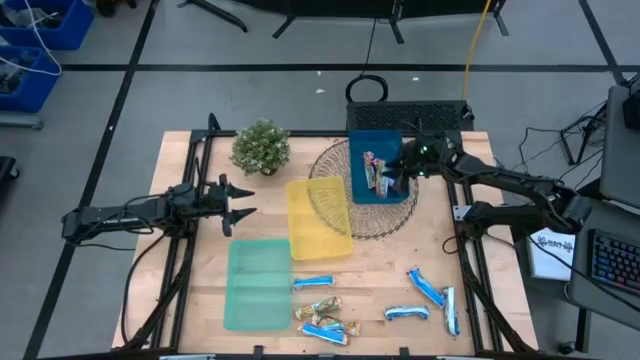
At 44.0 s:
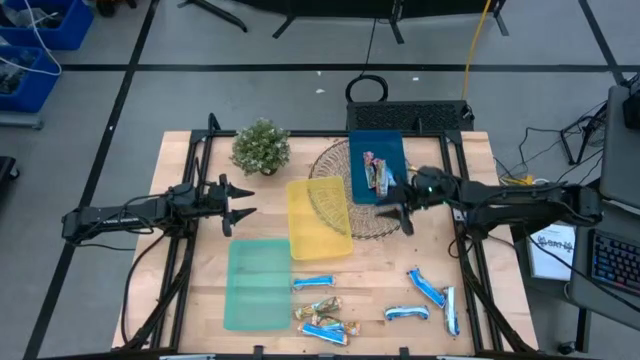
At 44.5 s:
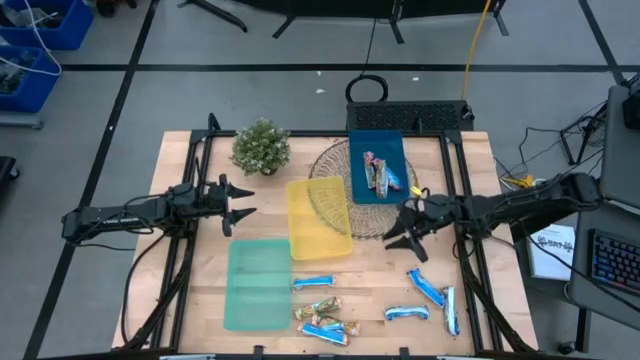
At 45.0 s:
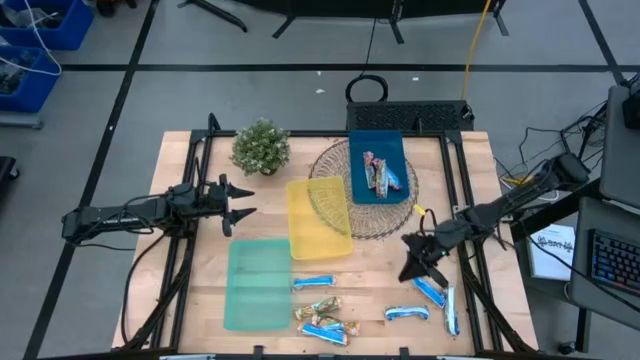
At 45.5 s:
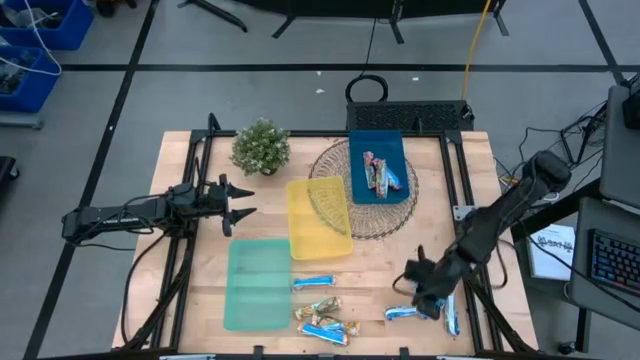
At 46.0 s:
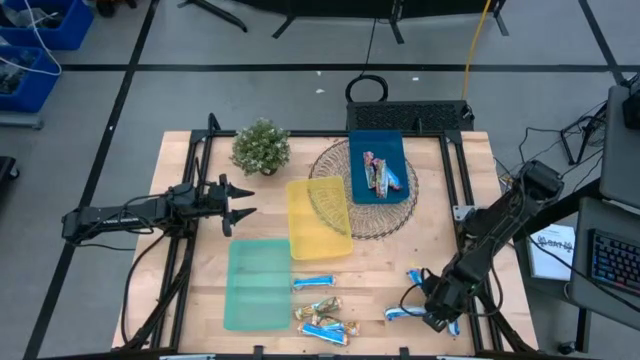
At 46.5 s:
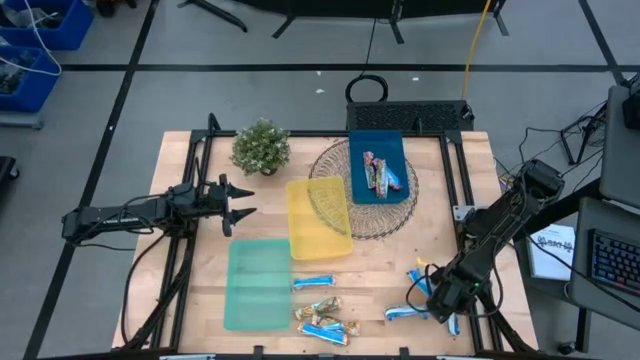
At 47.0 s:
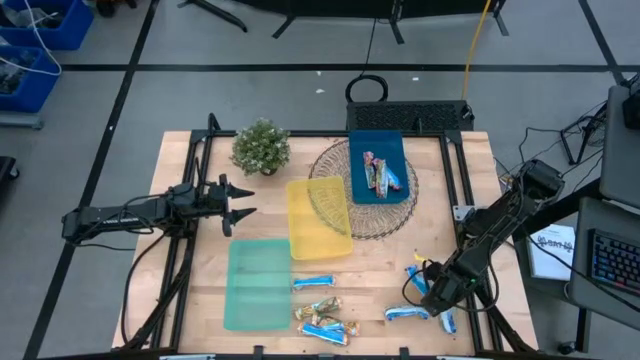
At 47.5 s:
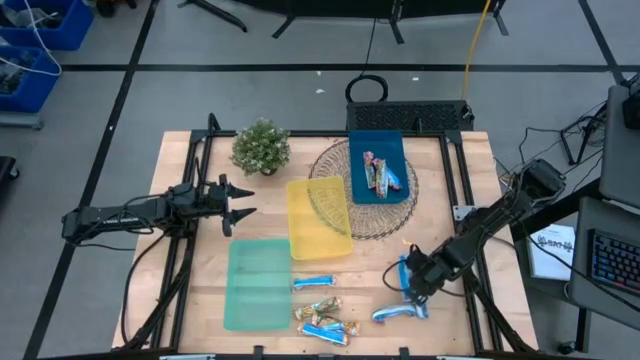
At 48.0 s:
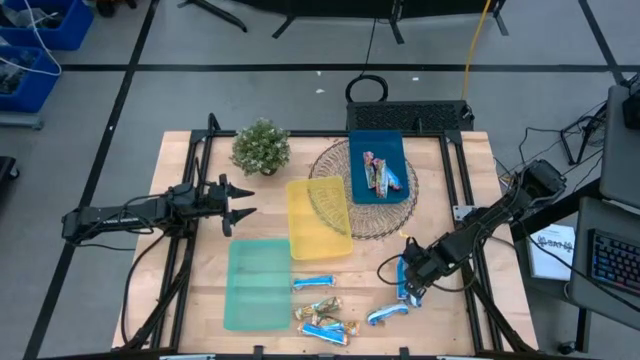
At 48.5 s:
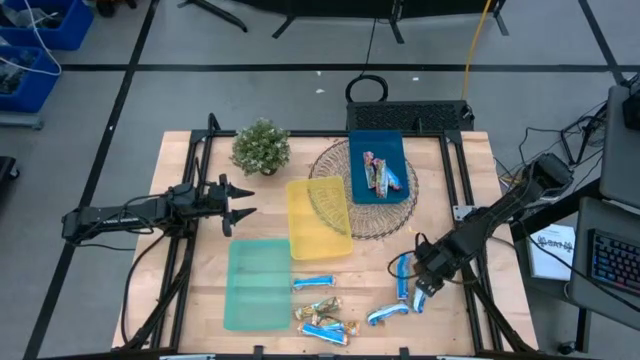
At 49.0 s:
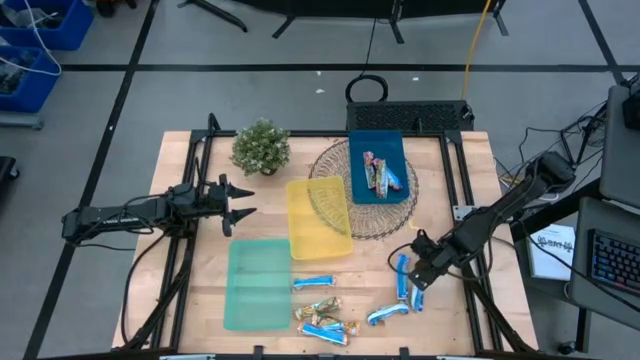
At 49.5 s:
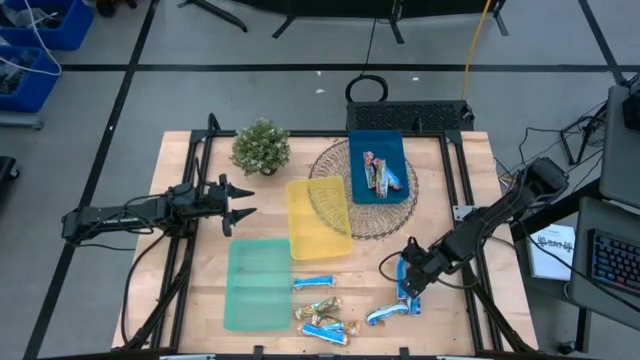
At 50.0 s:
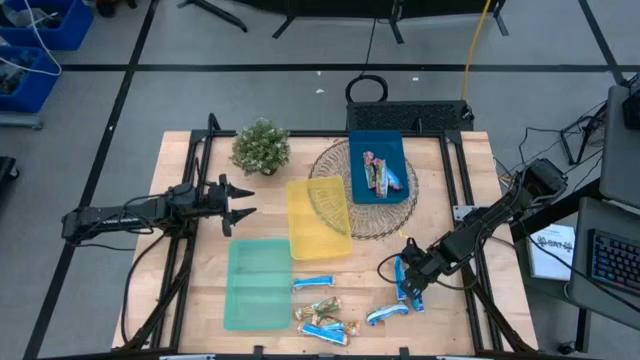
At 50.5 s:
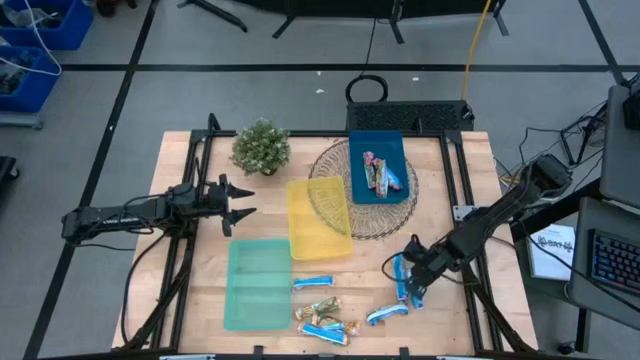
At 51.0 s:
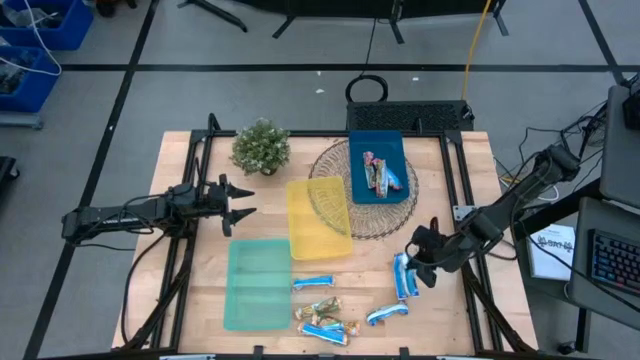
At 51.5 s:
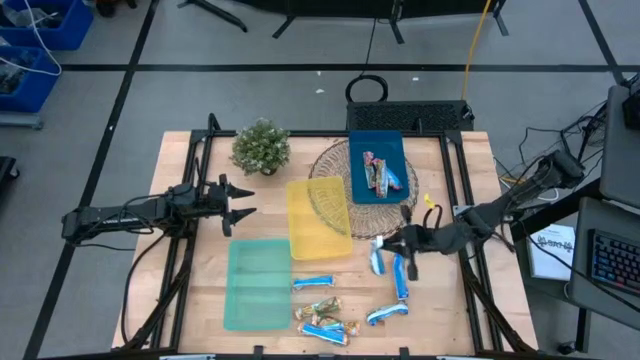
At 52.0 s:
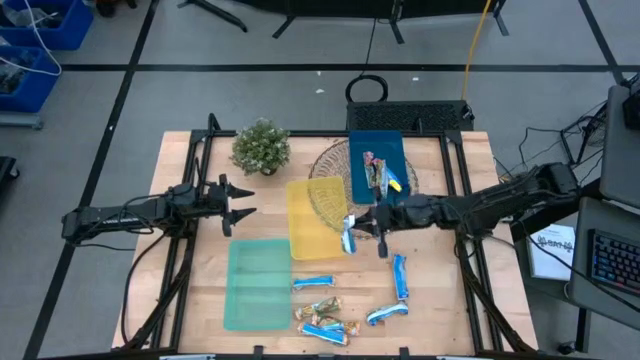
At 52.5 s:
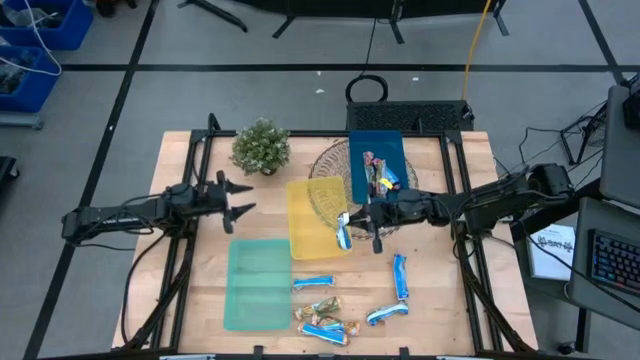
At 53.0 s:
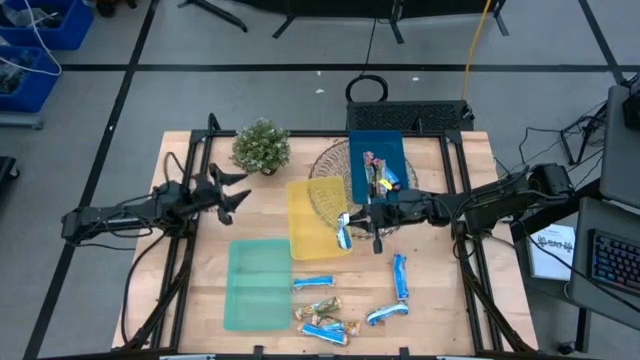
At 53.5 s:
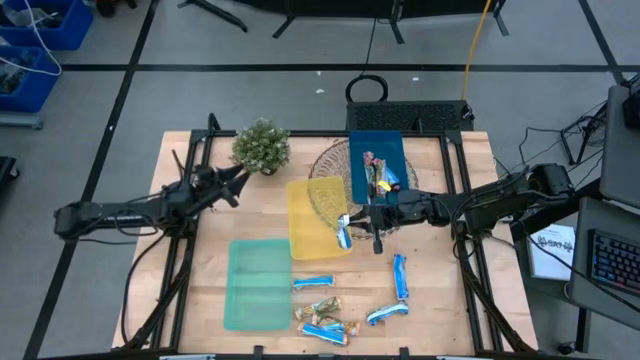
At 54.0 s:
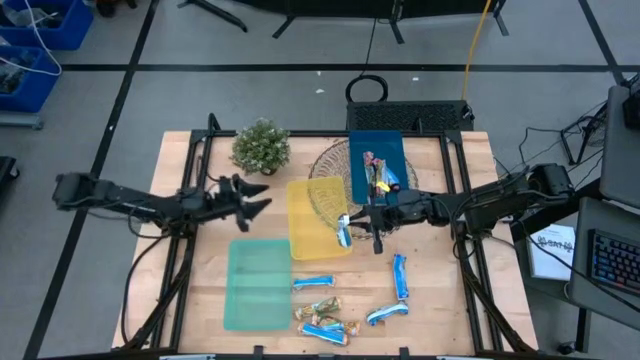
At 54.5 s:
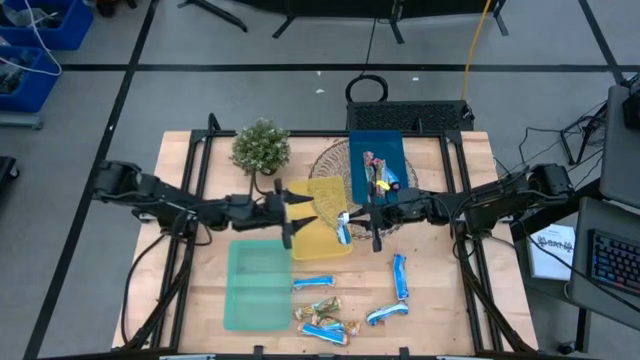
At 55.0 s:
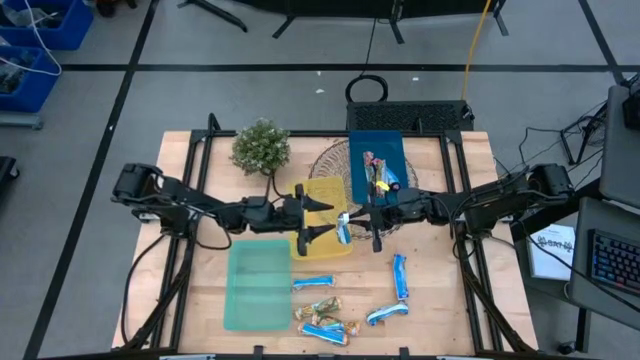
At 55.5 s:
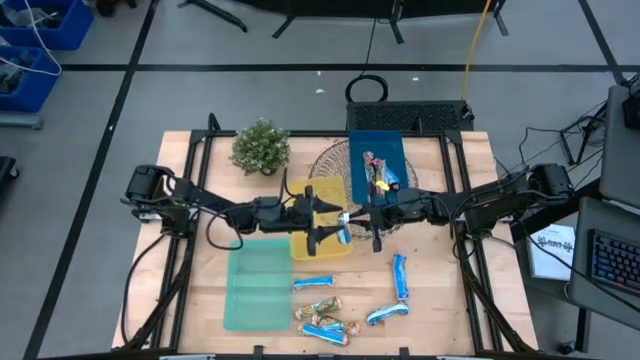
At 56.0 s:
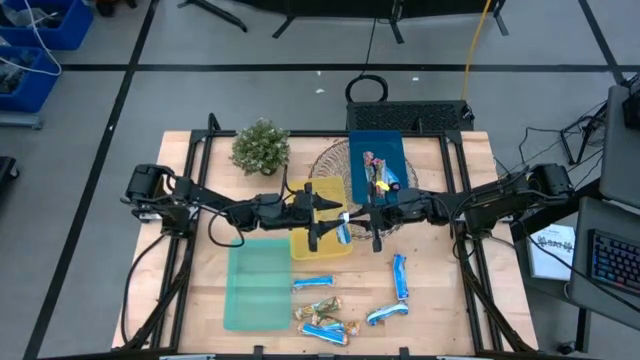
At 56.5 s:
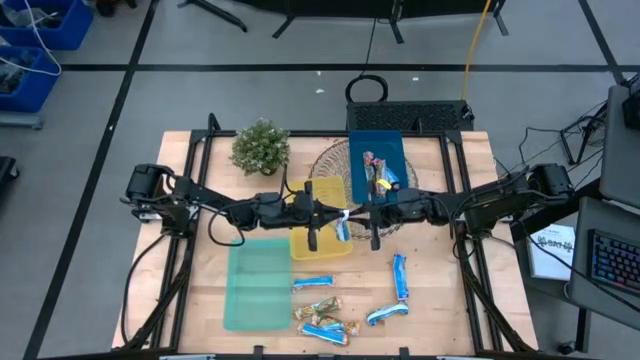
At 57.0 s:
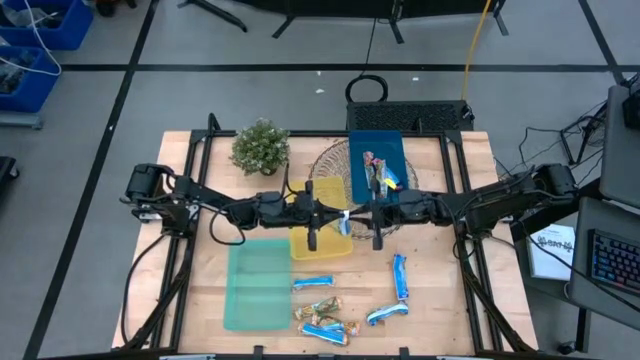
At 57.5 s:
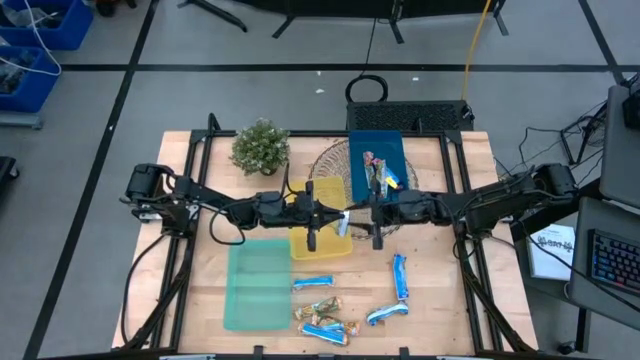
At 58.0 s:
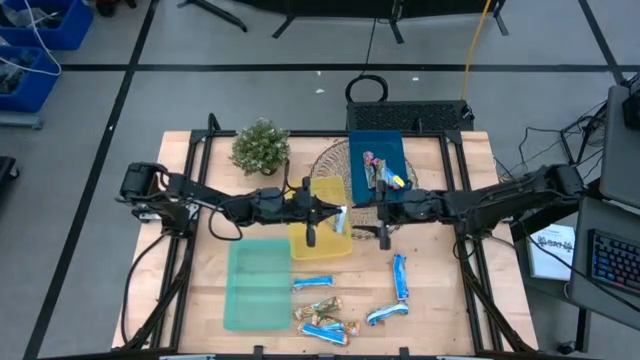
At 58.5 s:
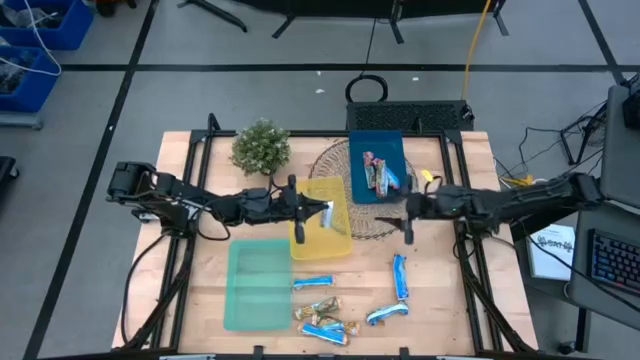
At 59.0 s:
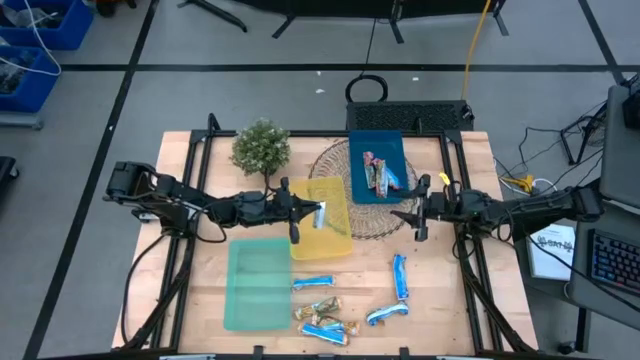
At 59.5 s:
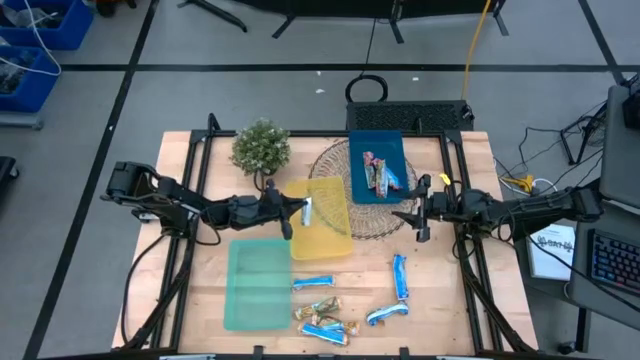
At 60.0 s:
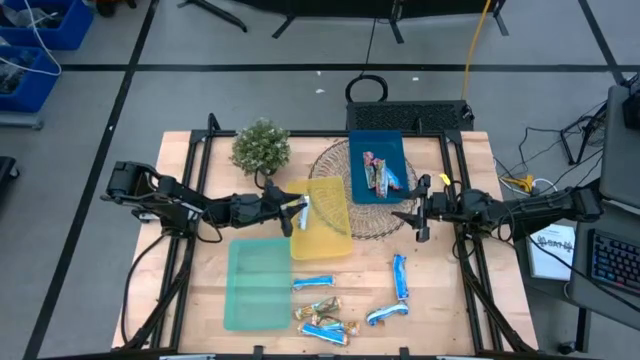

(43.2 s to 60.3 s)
Task: Pick and place Granola Bars by type
Put the blue granola bar into the yellow bin

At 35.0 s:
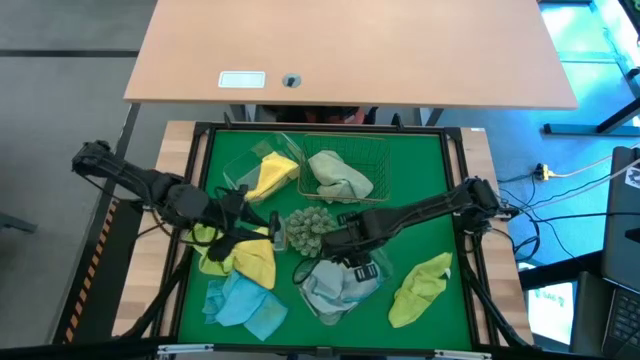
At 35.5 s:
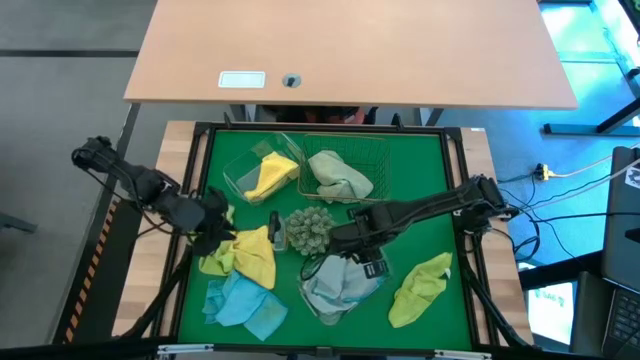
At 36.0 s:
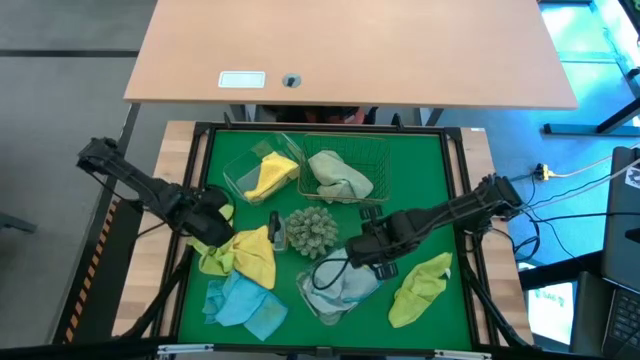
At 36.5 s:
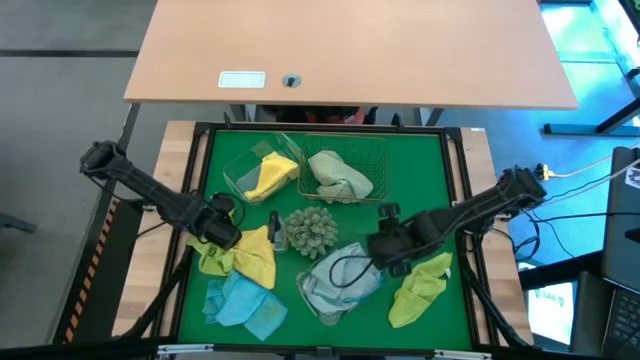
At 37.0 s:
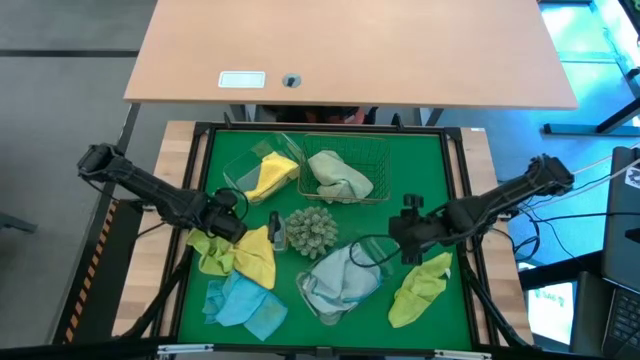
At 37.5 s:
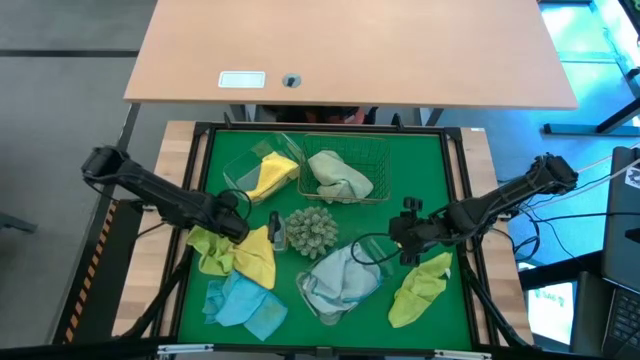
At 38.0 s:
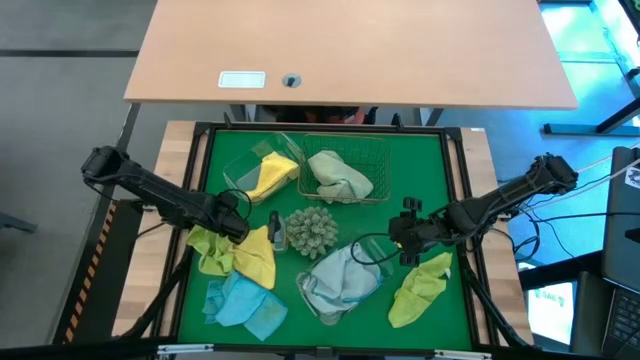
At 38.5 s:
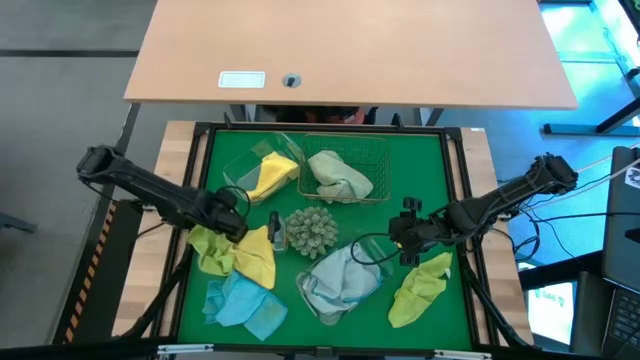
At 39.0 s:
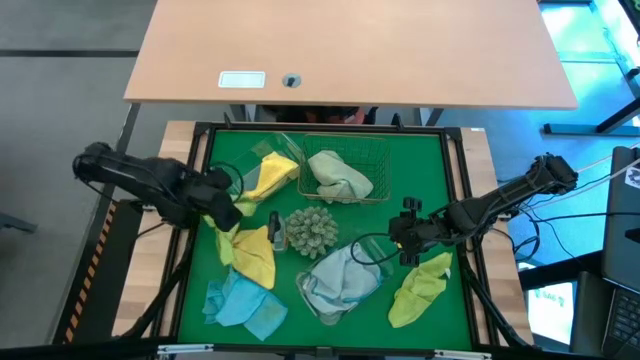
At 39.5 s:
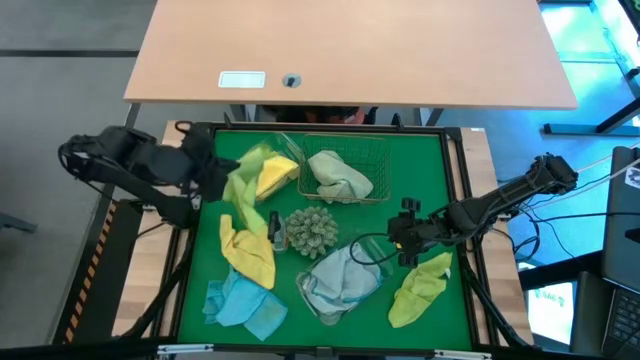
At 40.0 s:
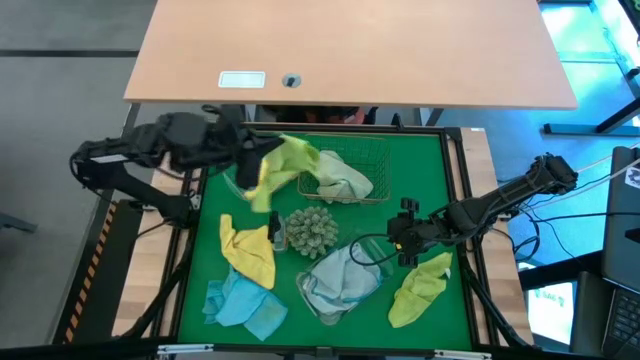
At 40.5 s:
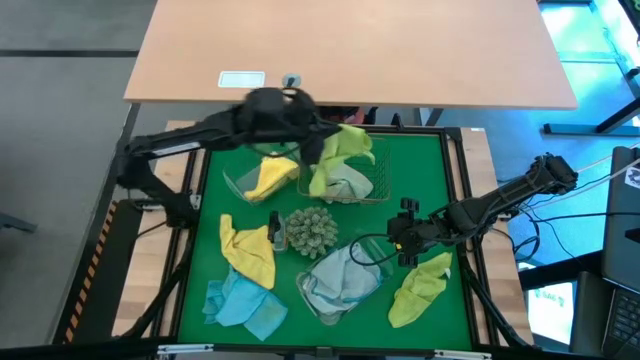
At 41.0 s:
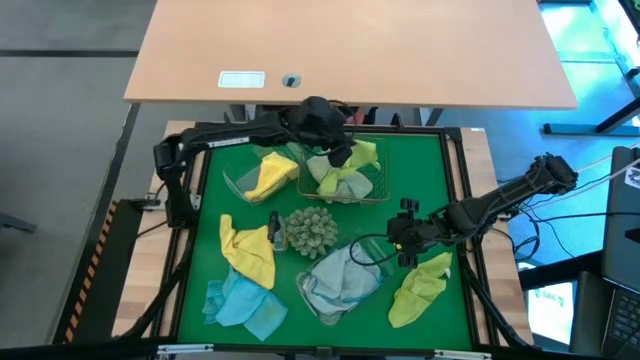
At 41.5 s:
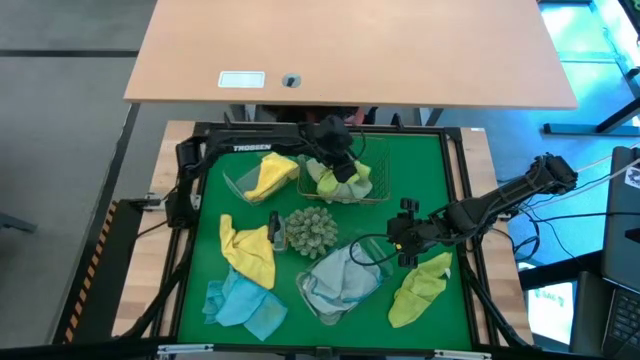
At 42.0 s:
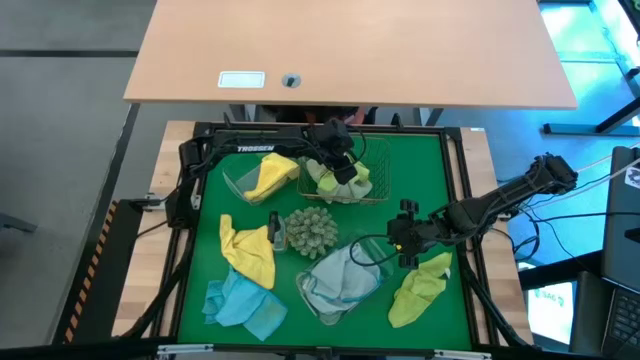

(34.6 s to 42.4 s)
Task: Sort microfiber towel by color & place in baskets
Put the left green microfiber towel into the wire basket
